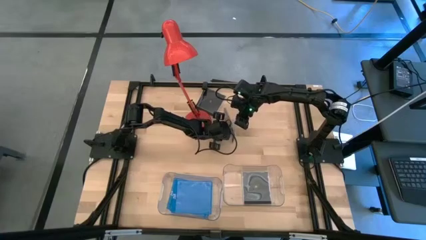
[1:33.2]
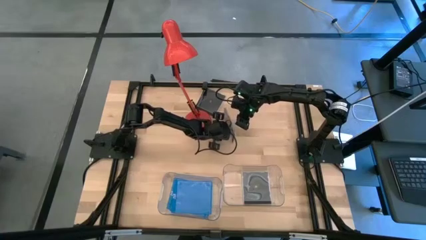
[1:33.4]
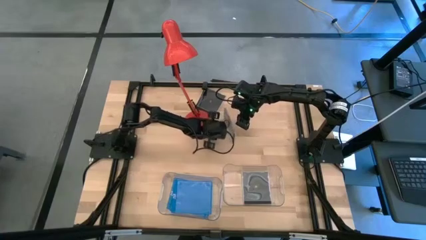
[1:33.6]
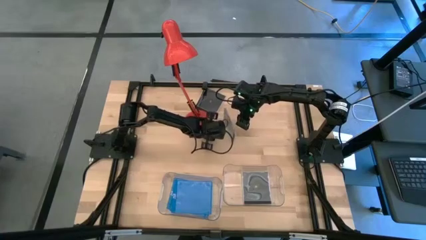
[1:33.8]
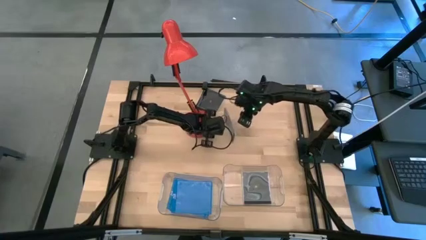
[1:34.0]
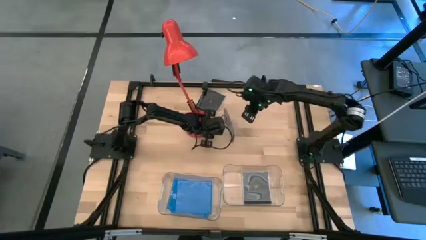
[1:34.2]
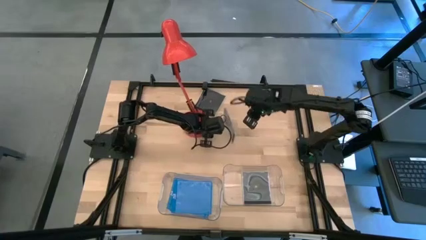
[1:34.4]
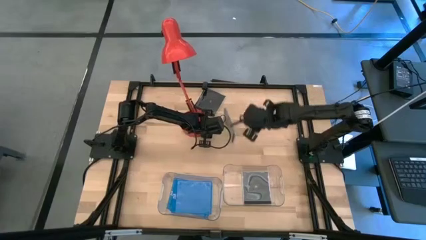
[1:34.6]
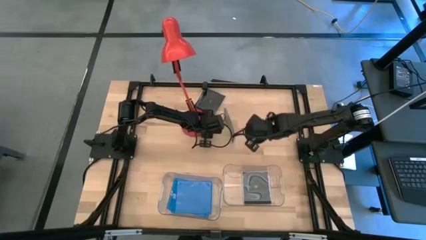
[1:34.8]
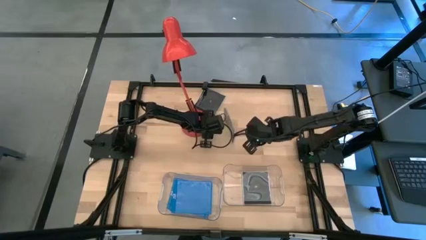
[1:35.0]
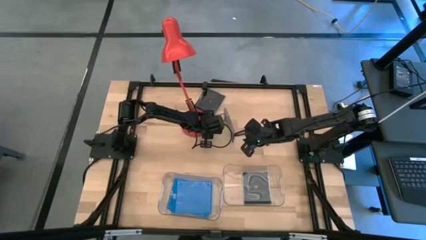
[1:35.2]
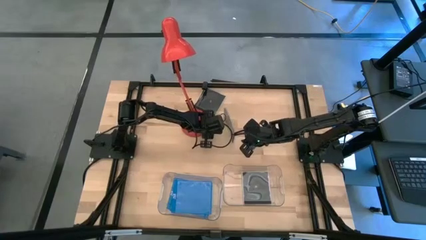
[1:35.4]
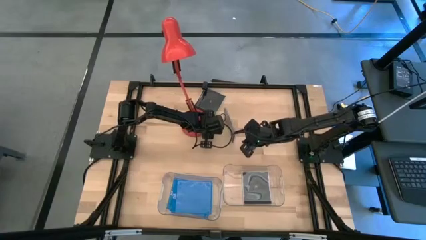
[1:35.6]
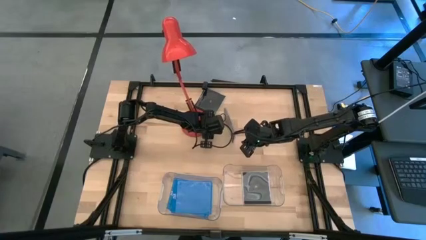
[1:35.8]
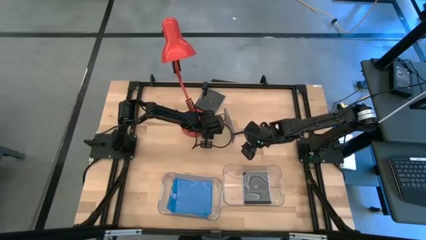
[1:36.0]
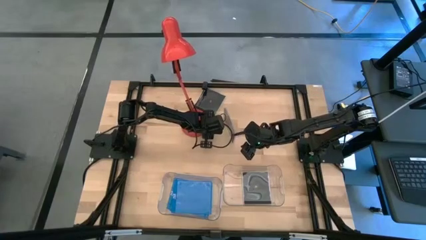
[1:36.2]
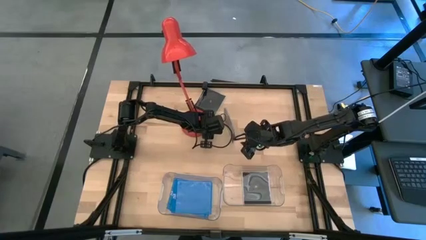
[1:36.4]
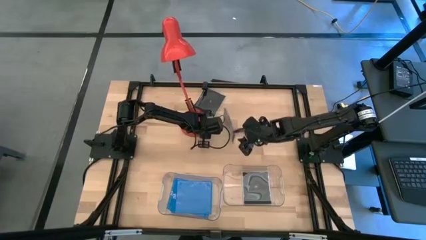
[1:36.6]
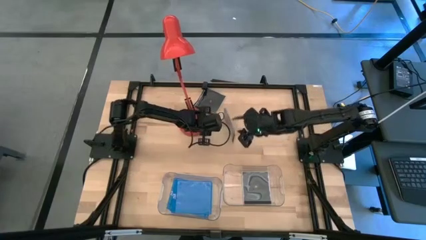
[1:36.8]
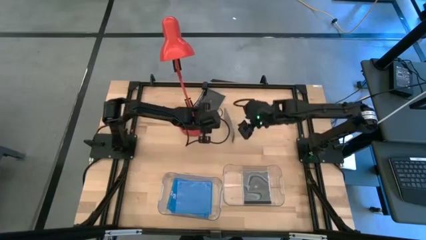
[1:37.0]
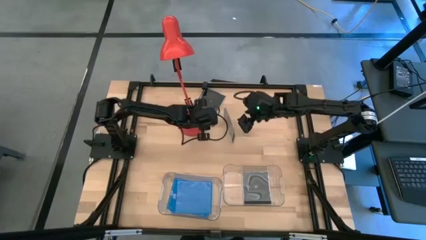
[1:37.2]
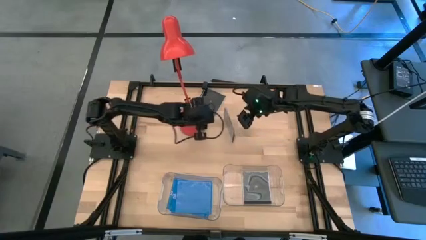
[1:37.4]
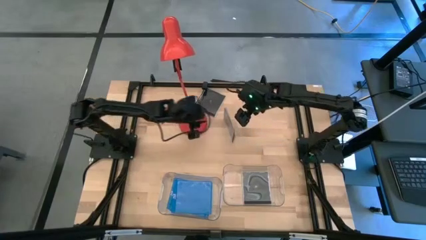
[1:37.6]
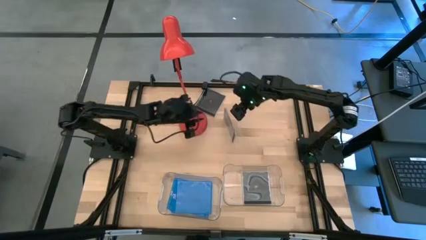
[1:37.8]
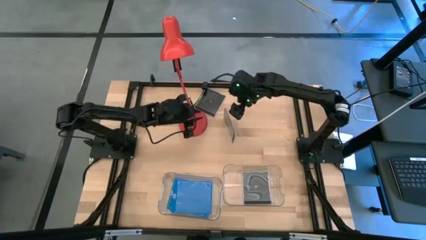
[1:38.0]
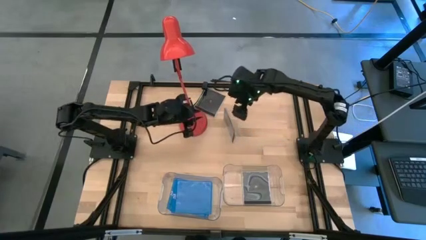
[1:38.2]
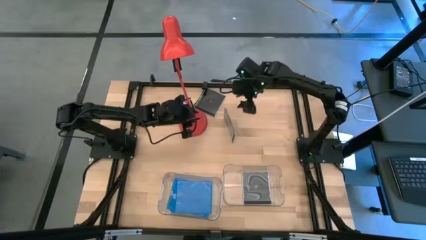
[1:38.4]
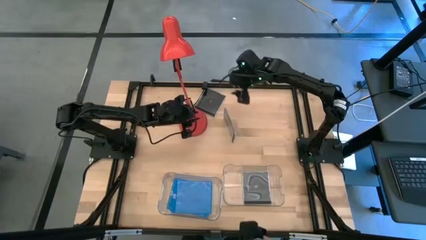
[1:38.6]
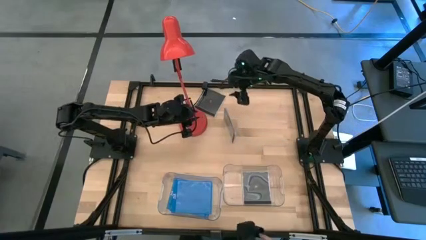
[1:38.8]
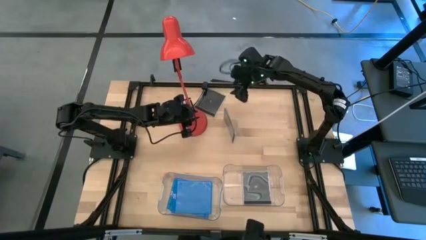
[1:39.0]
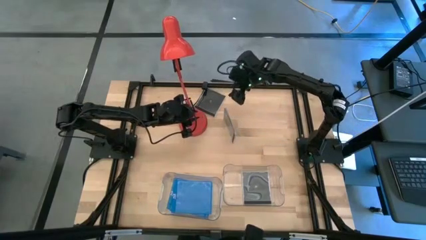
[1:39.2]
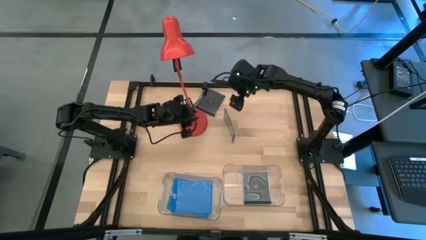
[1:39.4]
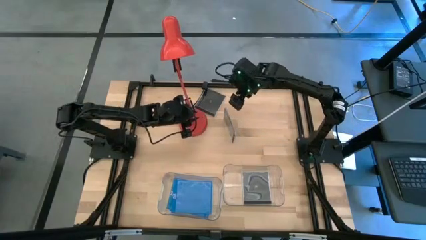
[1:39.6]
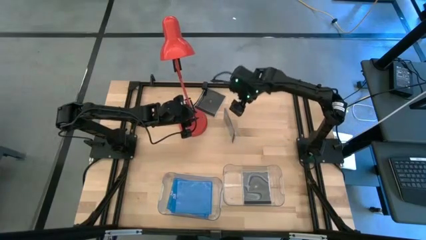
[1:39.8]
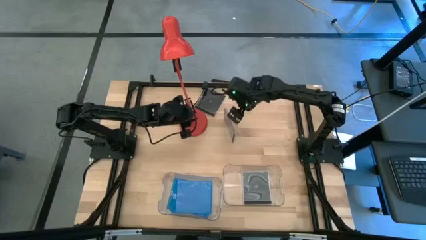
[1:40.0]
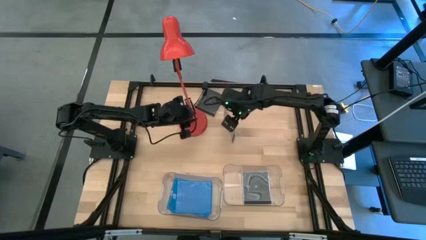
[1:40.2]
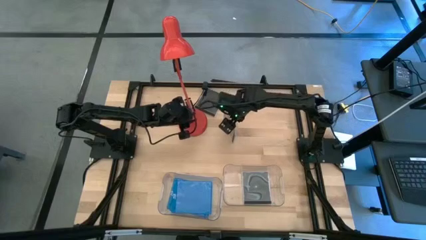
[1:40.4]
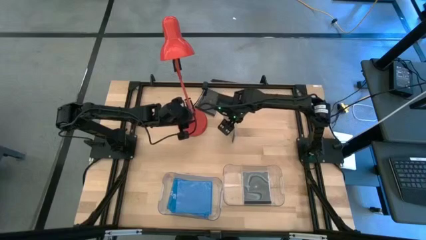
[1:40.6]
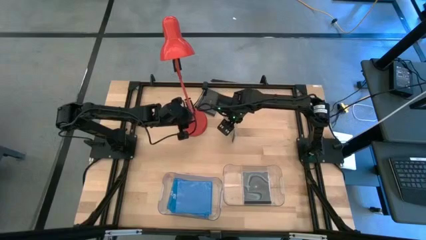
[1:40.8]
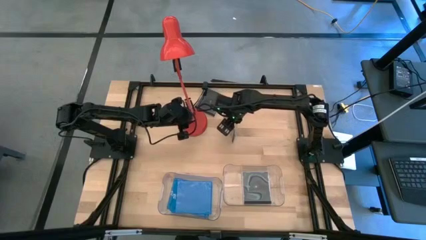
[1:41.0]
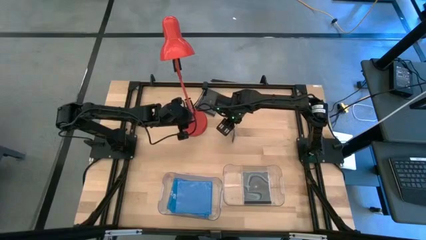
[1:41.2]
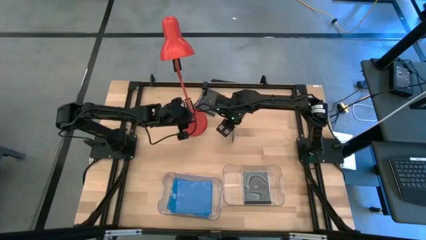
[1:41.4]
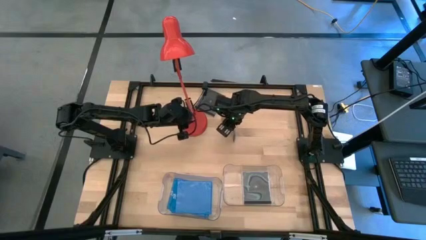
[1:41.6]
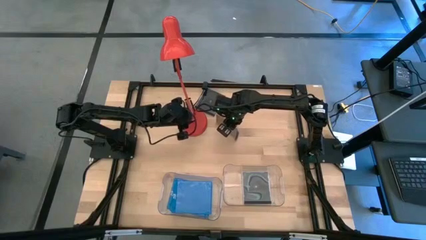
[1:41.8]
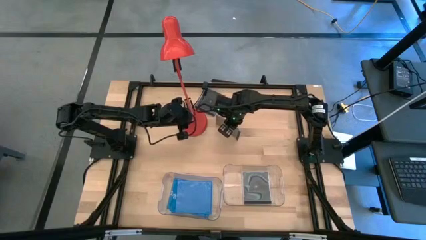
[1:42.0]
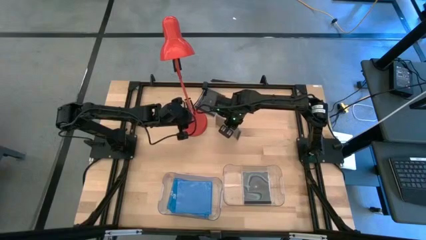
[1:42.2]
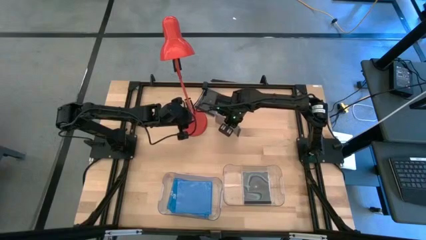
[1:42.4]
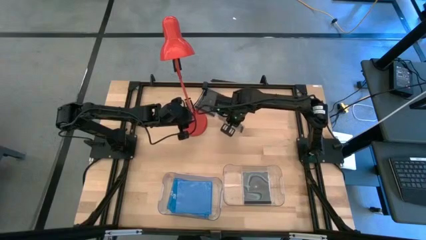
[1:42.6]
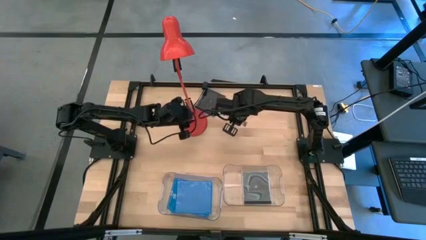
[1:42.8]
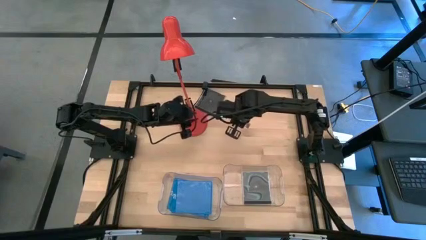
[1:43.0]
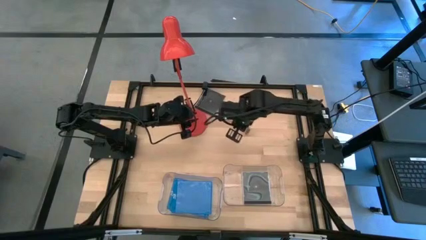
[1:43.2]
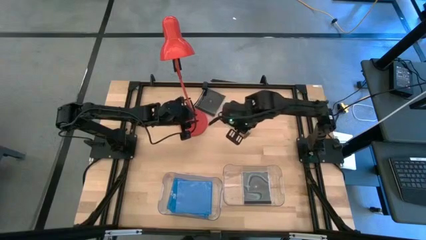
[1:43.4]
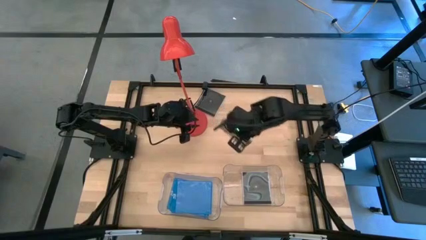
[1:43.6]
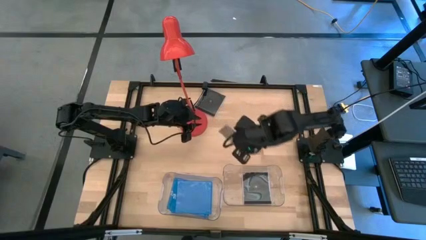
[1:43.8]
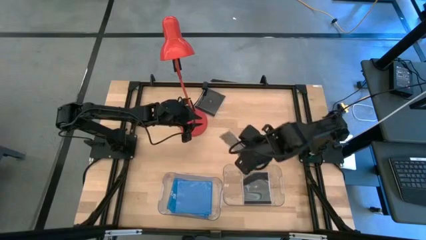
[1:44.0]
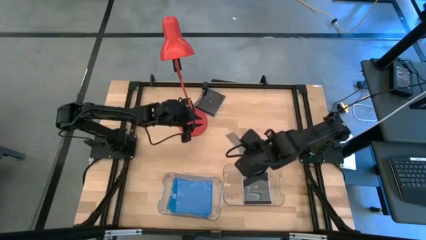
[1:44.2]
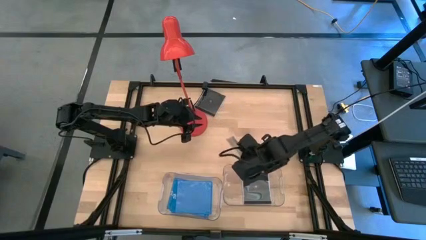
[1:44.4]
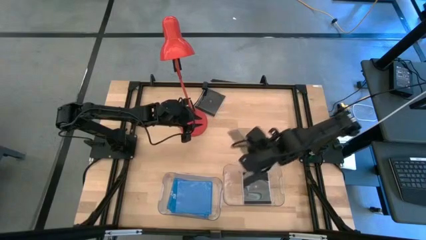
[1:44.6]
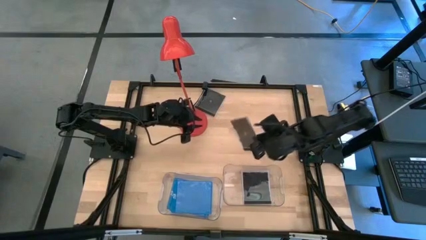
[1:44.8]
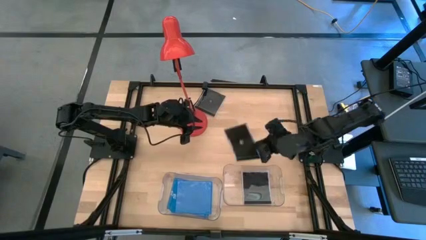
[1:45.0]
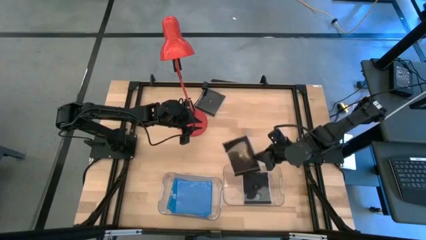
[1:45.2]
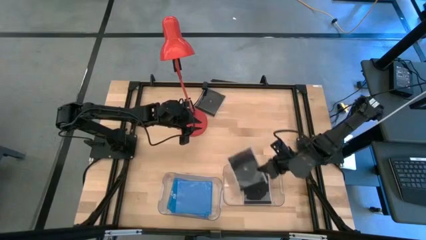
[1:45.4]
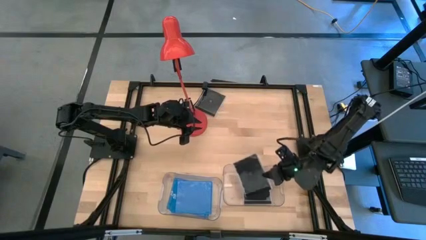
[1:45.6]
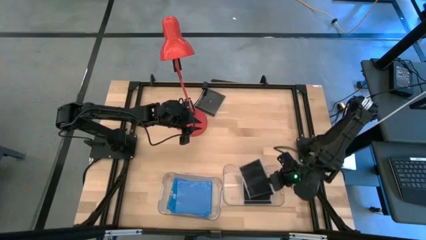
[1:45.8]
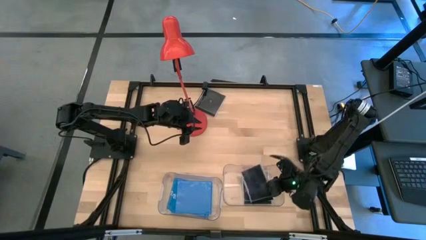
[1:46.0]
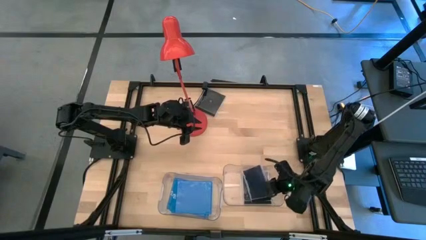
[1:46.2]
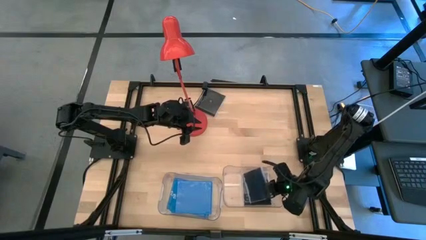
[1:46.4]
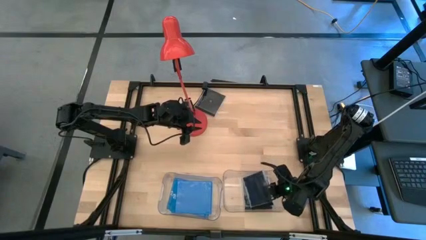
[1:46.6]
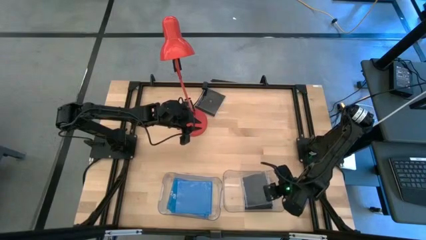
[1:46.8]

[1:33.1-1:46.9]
Task: Pick & place jewel cases by type
Put the right black cd case into the right transparent bin
